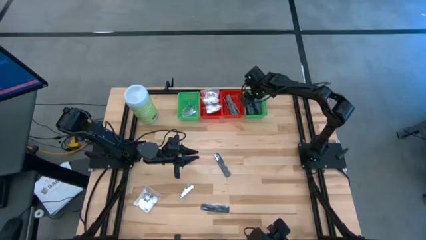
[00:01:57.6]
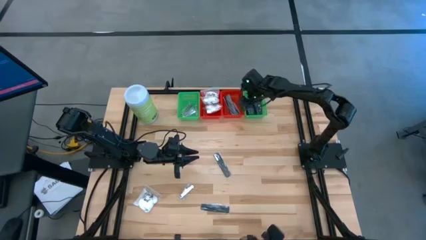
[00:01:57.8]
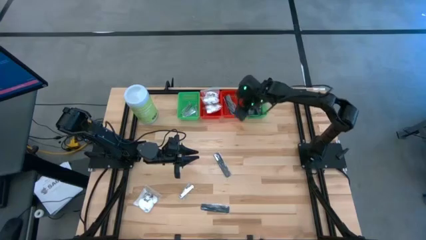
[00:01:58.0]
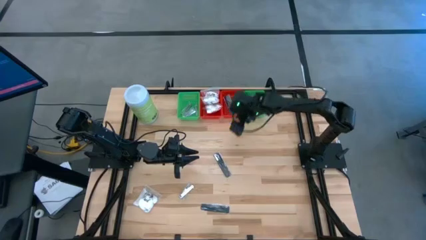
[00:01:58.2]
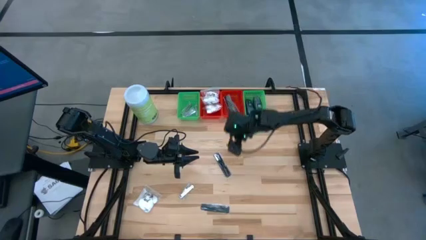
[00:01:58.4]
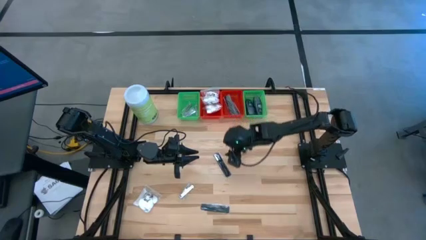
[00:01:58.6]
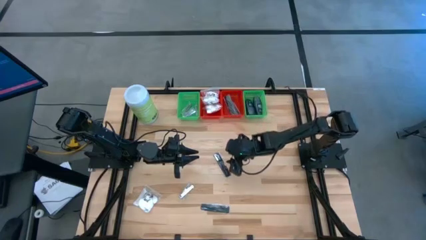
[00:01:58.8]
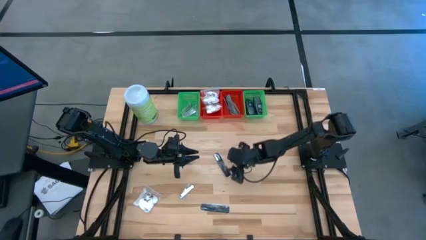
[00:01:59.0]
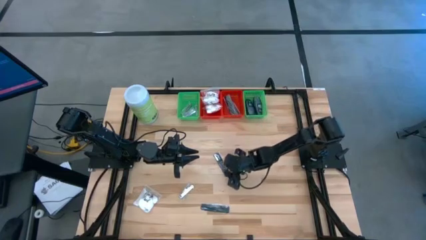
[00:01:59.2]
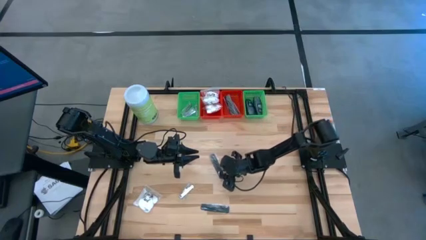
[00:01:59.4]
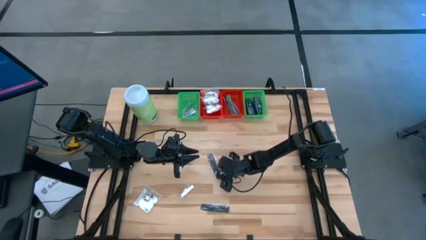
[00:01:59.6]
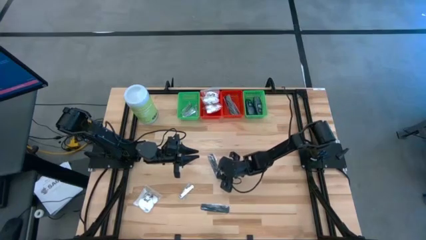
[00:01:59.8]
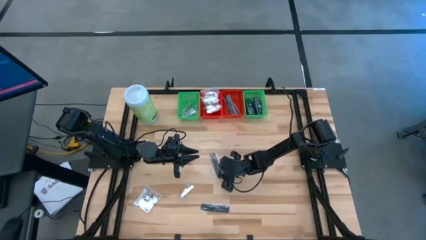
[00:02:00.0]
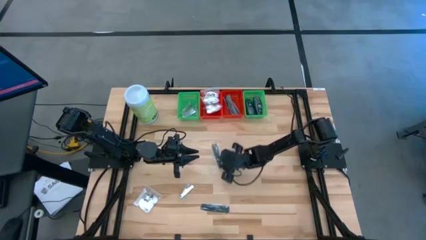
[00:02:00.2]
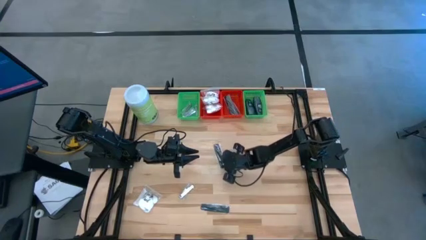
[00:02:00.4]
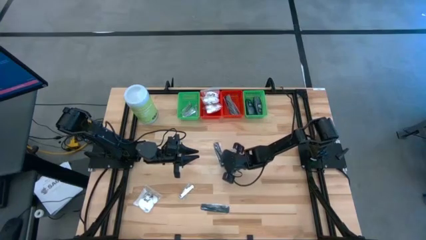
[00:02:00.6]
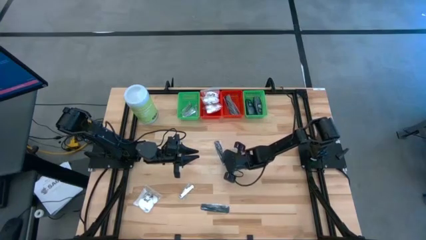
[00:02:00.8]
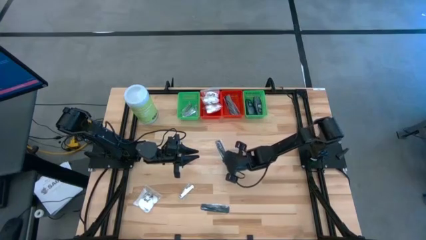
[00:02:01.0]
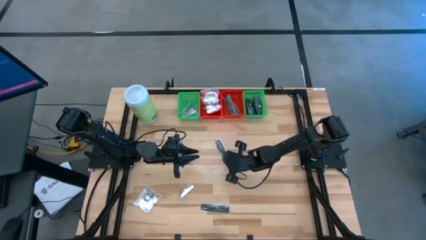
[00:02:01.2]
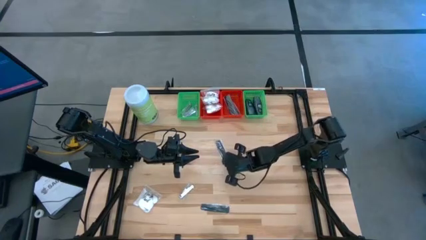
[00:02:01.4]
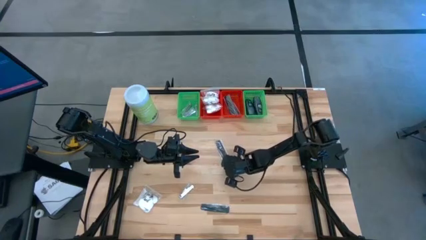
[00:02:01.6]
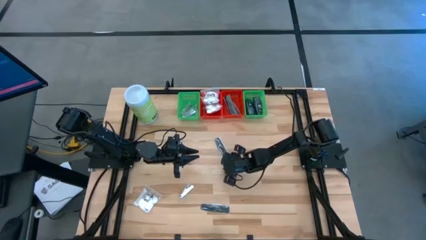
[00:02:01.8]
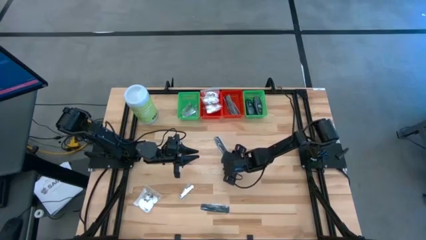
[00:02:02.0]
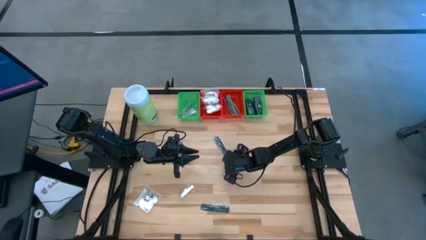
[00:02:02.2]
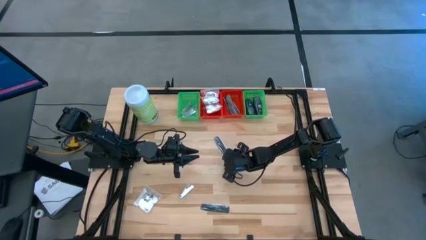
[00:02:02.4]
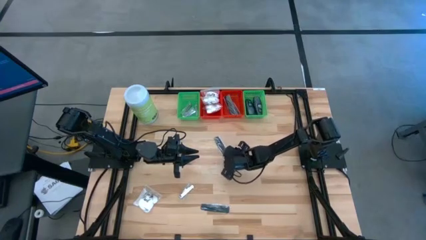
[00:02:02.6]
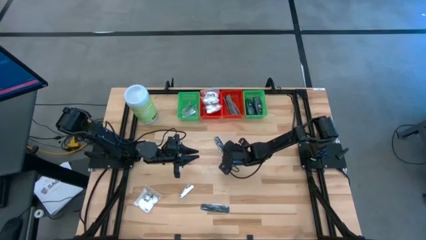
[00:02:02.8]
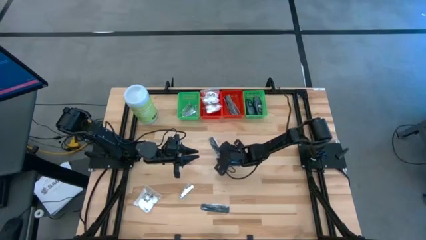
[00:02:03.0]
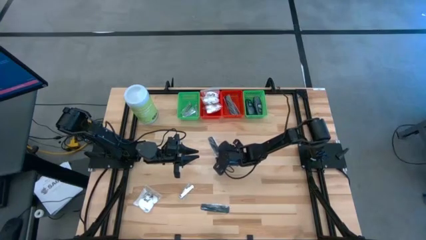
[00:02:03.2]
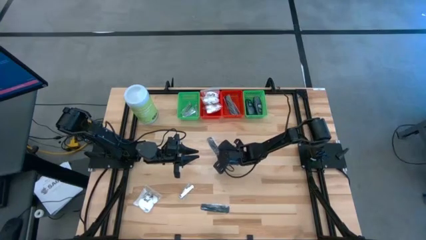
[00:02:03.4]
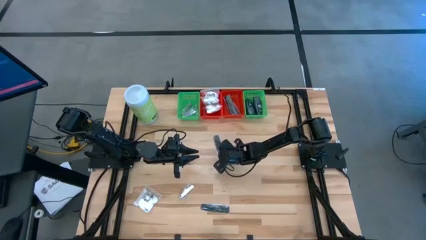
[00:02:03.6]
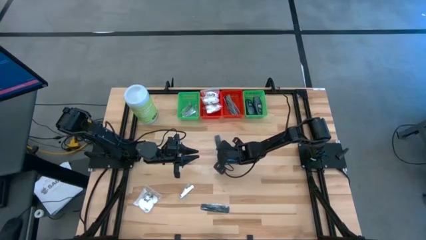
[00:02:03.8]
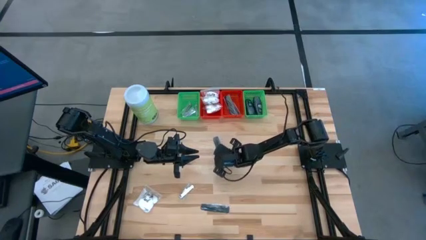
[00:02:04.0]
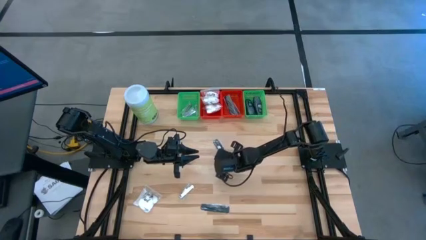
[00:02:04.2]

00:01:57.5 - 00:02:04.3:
Task: Pick & Place Travel size toiletries
Put the black comb into the right red bin

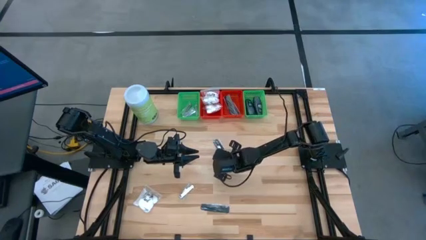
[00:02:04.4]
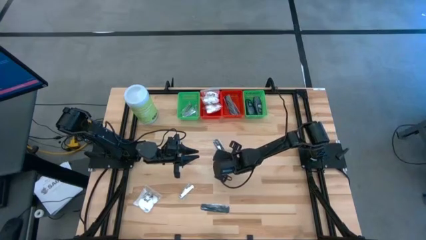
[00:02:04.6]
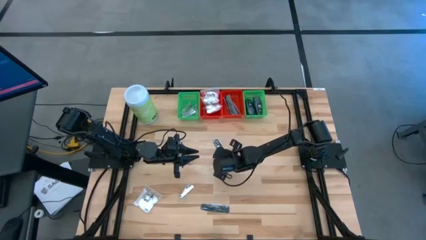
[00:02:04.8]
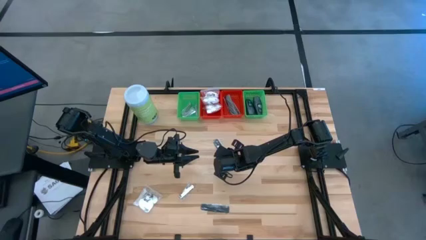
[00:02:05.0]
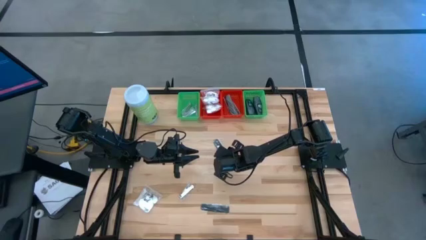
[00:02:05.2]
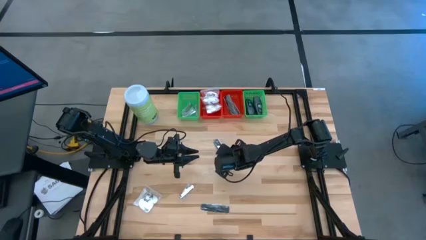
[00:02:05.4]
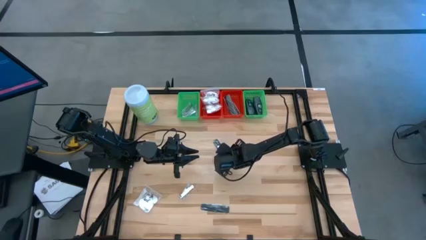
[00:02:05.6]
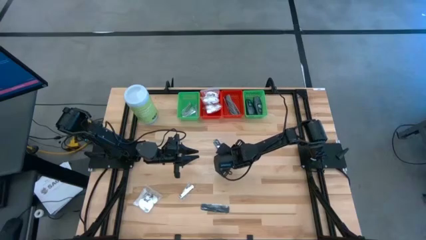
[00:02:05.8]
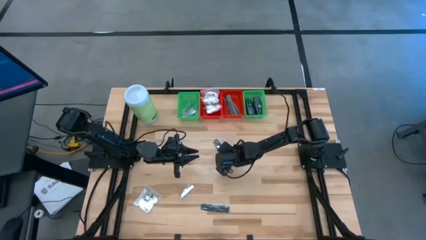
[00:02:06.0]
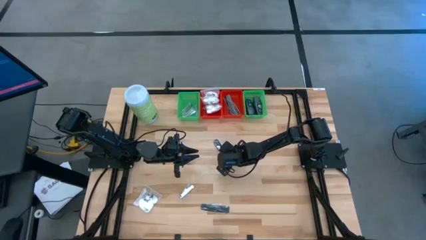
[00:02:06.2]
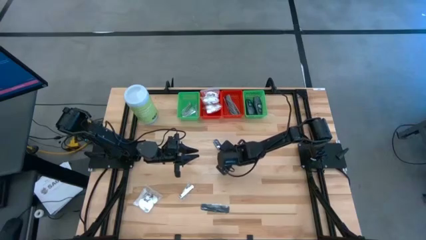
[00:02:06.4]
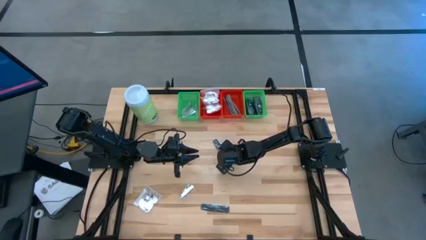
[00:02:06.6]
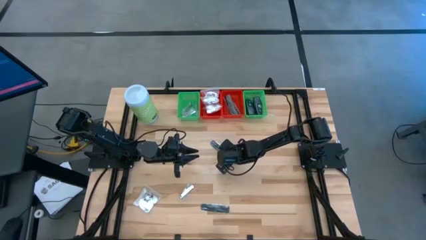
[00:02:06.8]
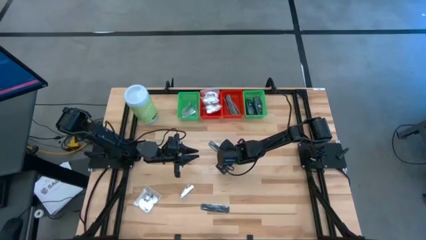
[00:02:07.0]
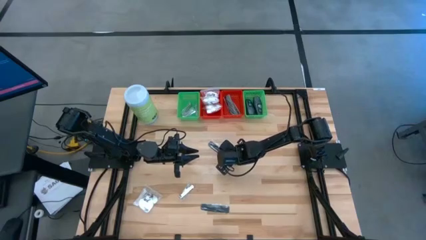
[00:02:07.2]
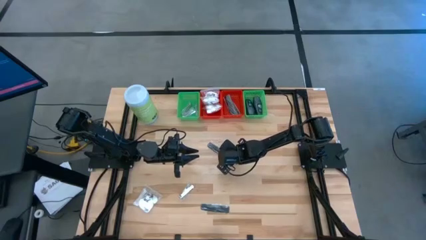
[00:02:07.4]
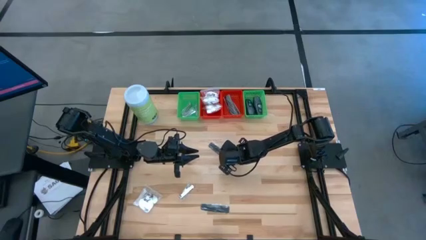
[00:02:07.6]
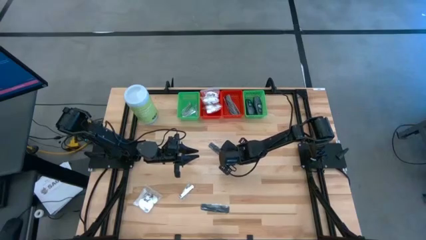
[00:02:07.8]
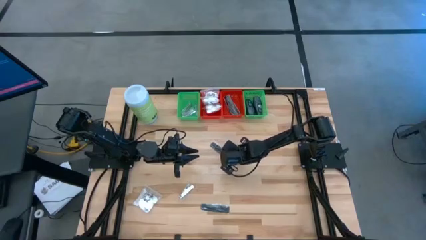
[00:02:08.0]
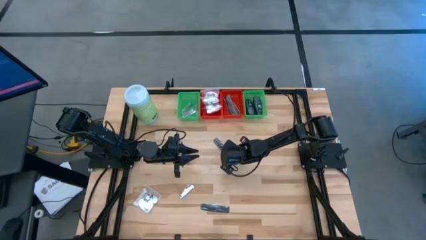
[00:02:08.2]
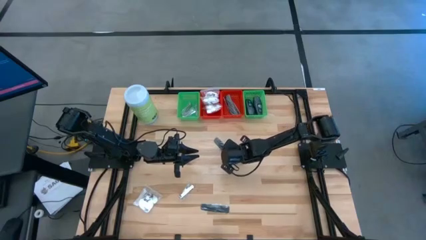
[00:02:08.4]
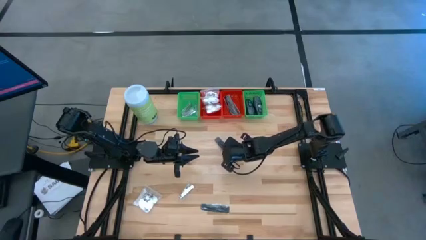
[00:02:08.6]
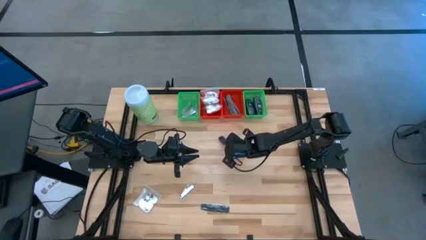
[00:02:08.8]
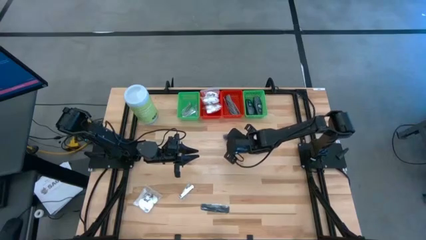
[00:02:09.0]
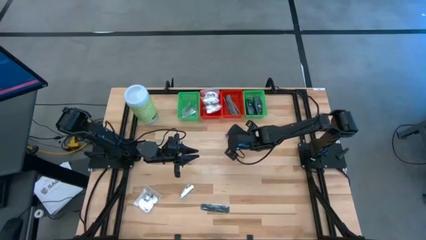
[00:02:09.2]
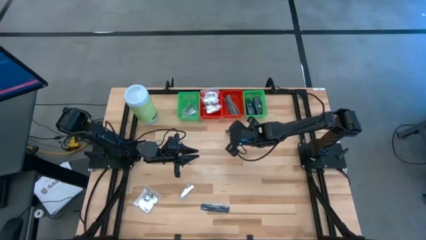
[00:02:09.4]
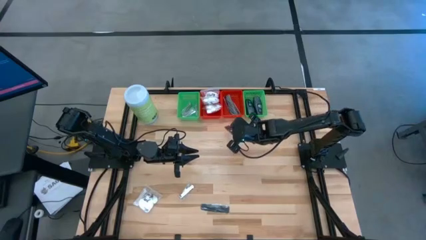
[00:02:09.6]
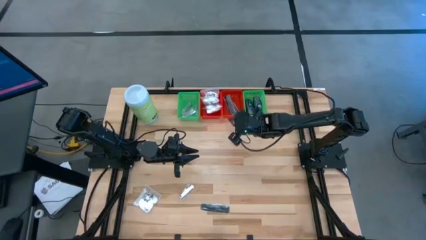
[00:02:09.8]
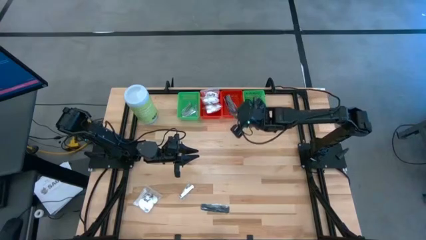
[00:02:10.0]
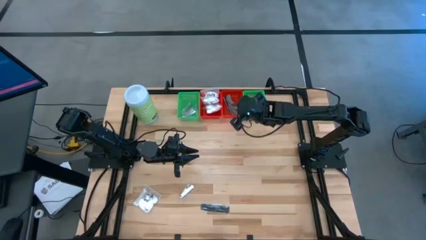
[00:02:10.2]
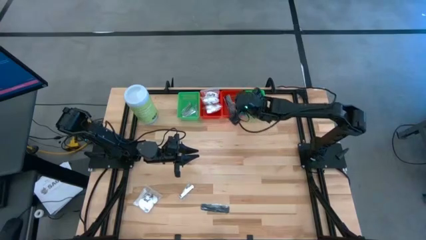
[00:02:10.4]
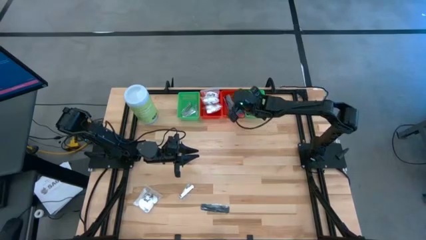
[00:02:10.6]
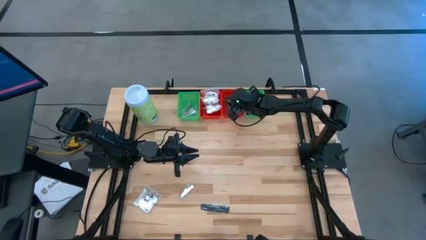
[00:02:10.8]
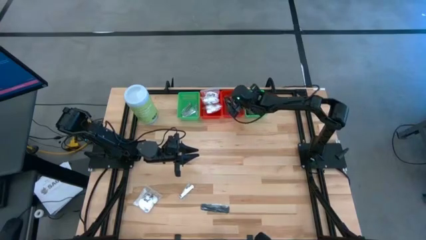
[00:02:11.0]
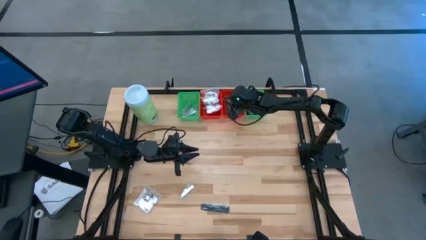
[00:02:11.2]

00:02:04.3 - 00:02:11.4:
Put the black comb into the right red bin
